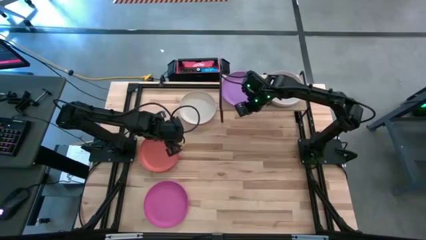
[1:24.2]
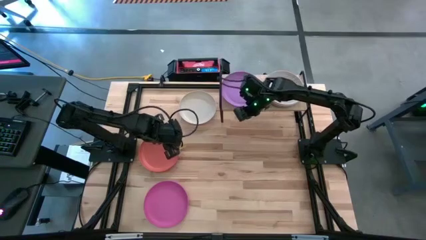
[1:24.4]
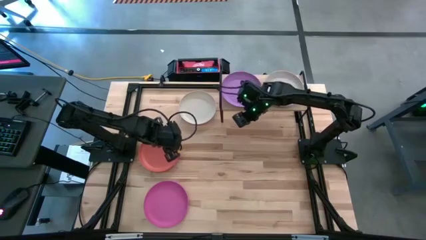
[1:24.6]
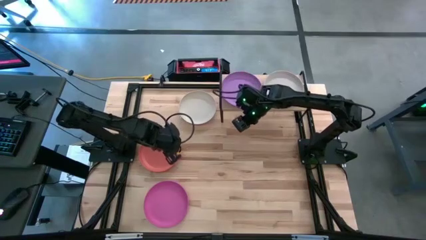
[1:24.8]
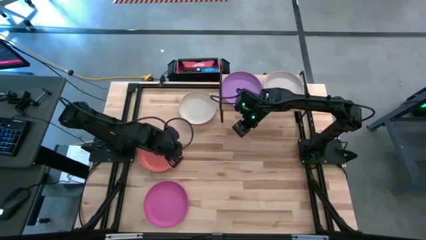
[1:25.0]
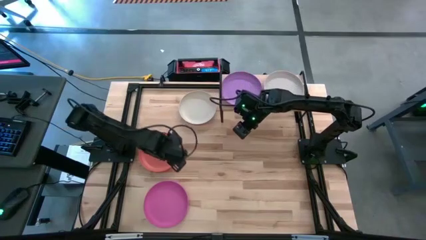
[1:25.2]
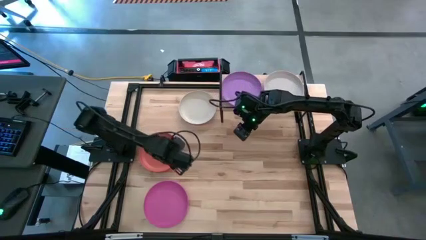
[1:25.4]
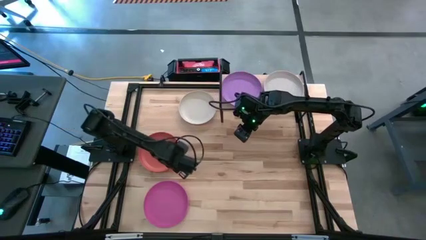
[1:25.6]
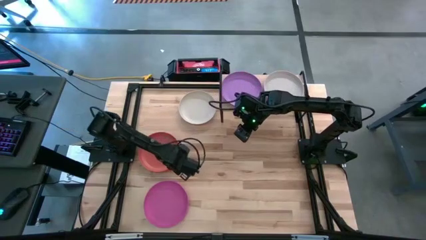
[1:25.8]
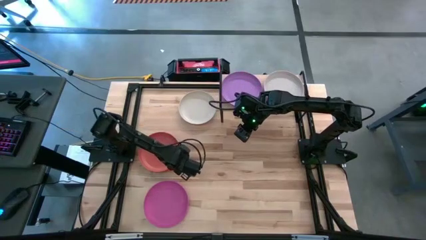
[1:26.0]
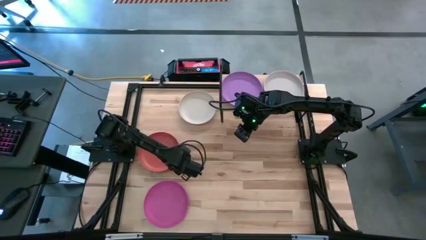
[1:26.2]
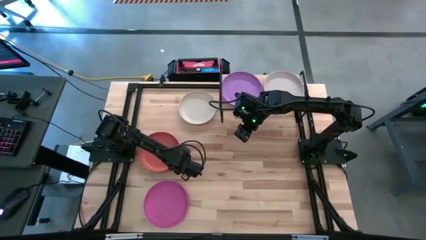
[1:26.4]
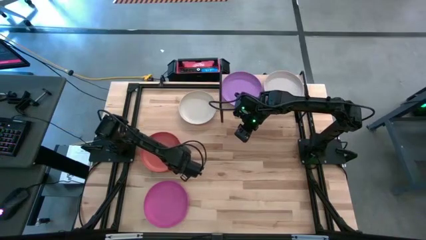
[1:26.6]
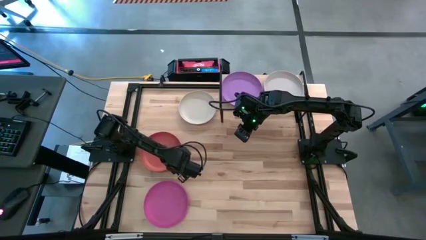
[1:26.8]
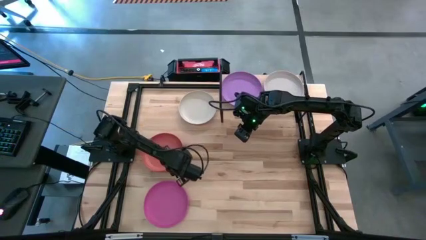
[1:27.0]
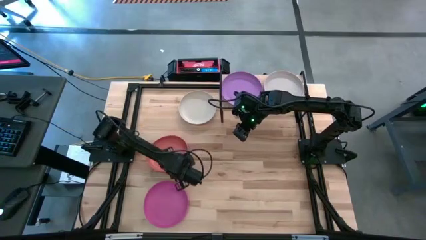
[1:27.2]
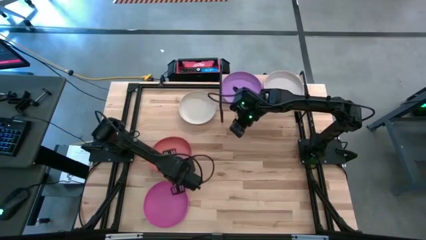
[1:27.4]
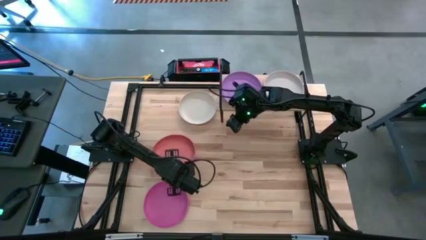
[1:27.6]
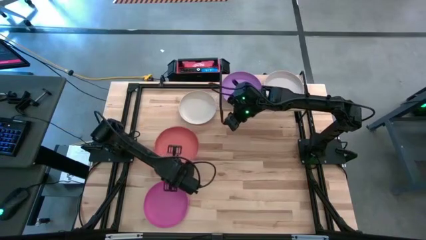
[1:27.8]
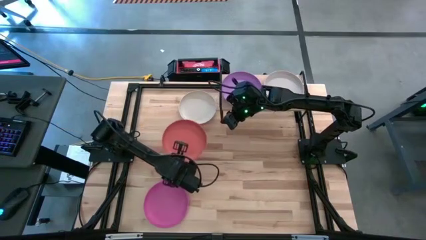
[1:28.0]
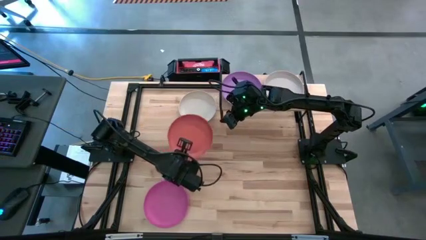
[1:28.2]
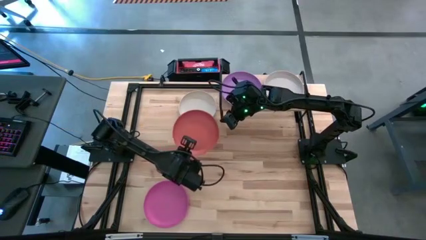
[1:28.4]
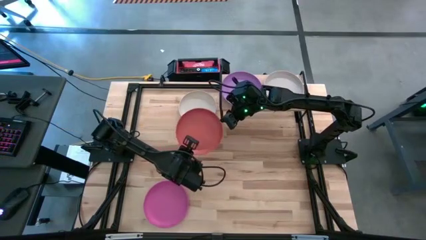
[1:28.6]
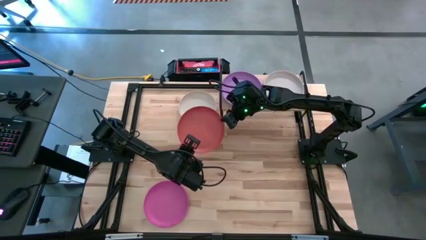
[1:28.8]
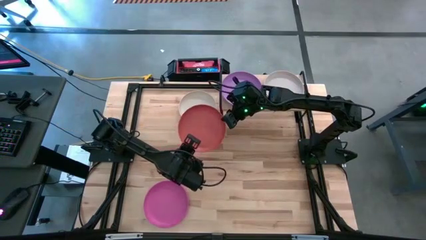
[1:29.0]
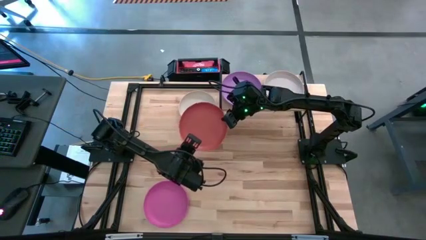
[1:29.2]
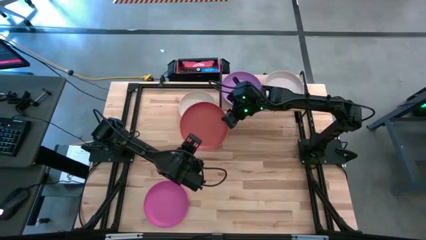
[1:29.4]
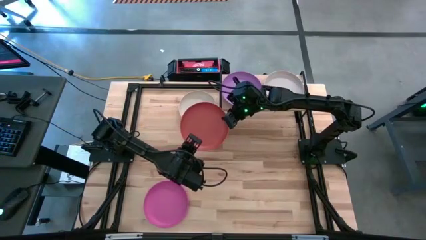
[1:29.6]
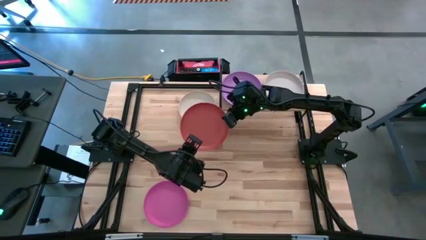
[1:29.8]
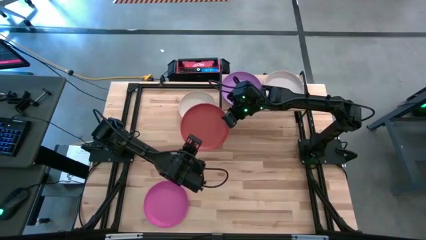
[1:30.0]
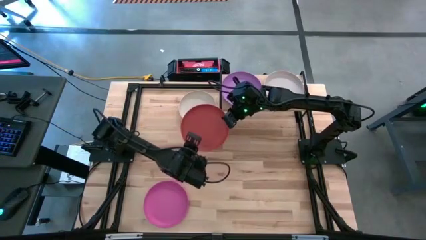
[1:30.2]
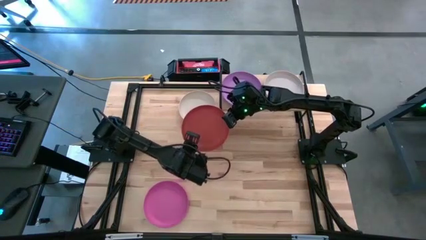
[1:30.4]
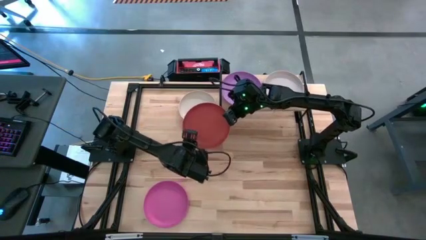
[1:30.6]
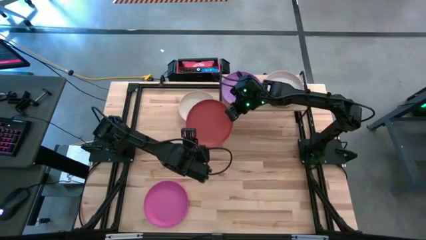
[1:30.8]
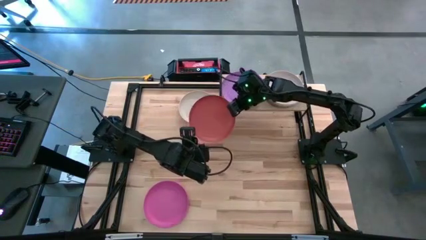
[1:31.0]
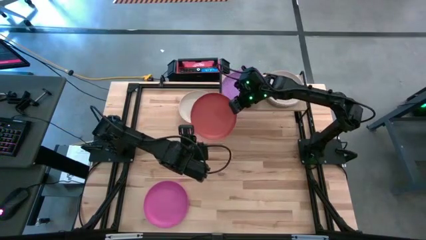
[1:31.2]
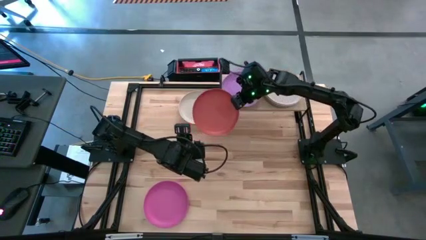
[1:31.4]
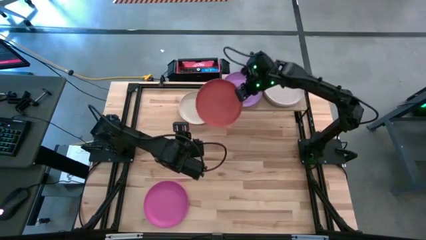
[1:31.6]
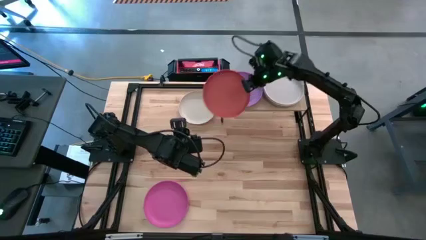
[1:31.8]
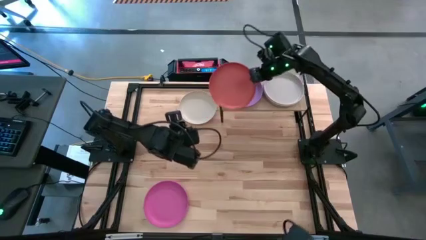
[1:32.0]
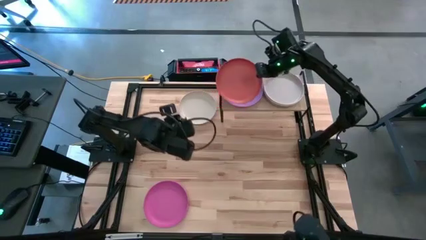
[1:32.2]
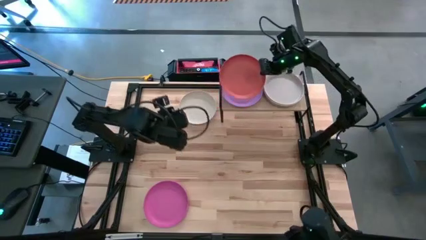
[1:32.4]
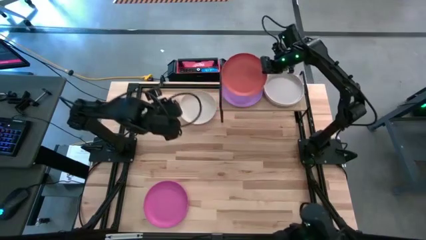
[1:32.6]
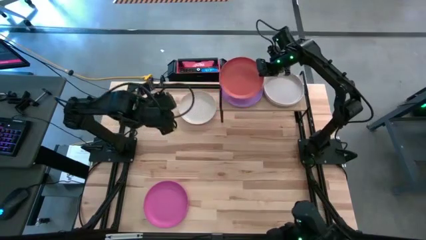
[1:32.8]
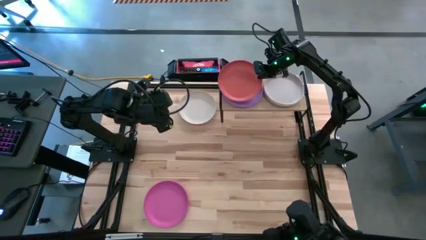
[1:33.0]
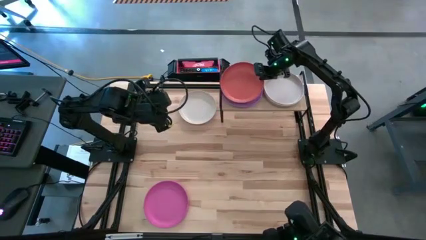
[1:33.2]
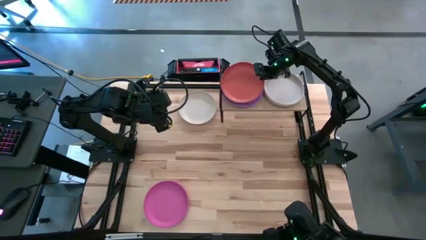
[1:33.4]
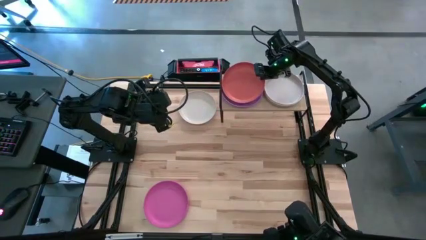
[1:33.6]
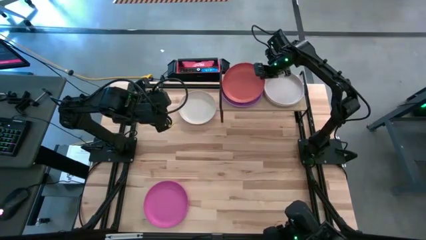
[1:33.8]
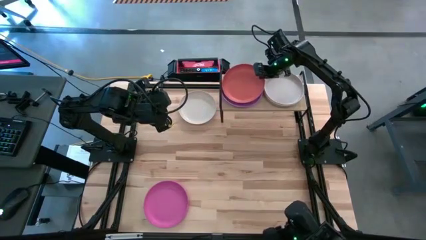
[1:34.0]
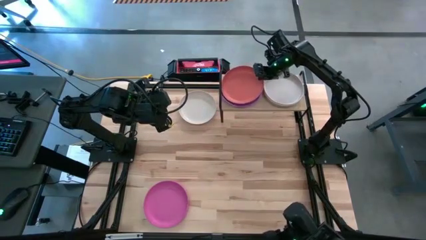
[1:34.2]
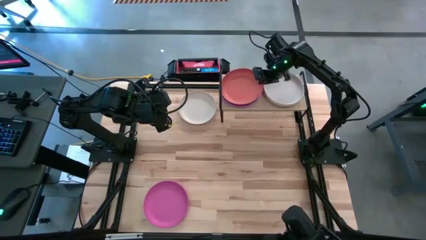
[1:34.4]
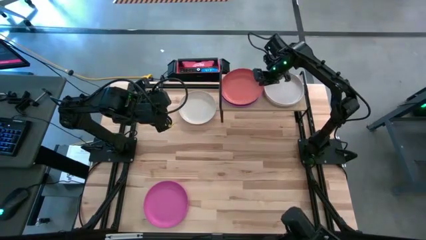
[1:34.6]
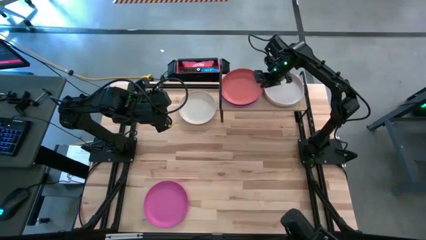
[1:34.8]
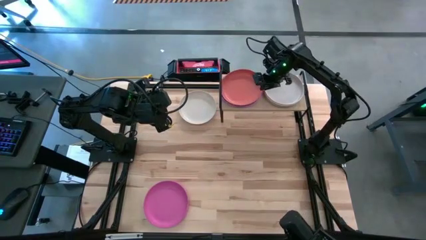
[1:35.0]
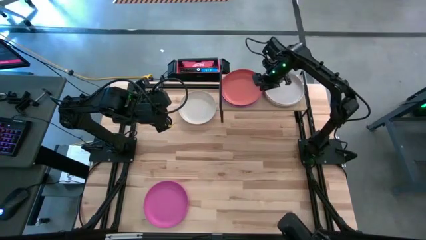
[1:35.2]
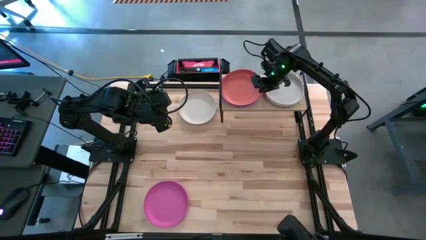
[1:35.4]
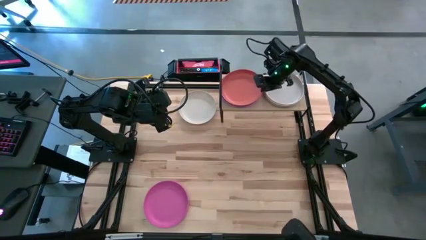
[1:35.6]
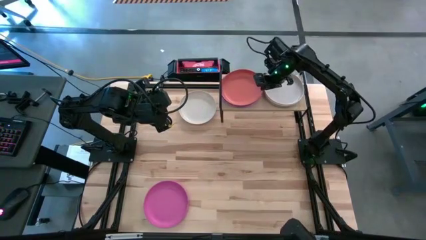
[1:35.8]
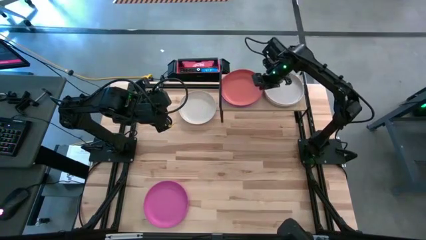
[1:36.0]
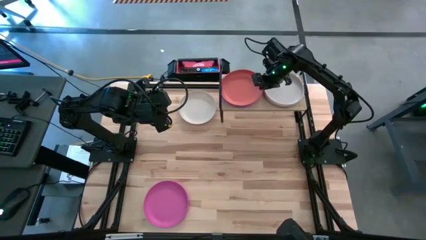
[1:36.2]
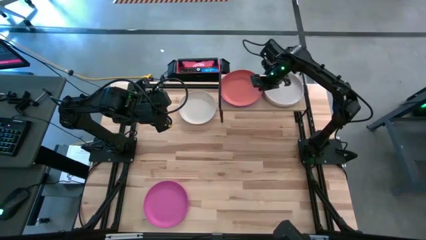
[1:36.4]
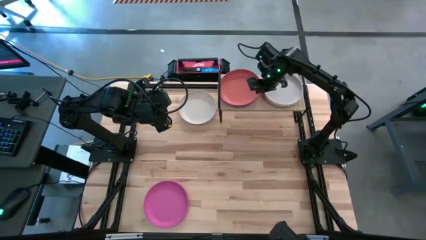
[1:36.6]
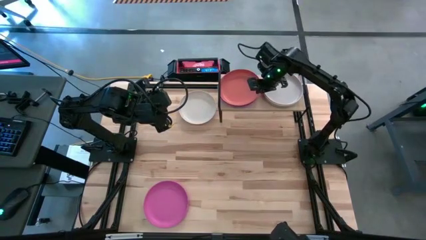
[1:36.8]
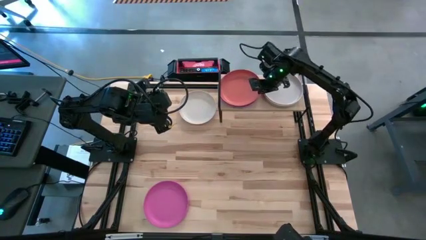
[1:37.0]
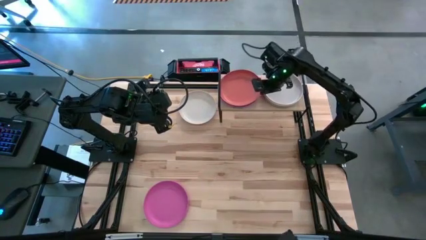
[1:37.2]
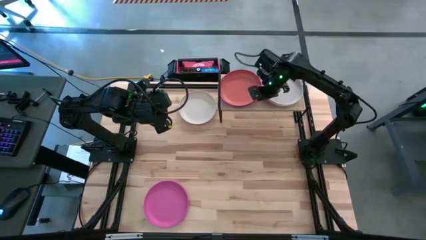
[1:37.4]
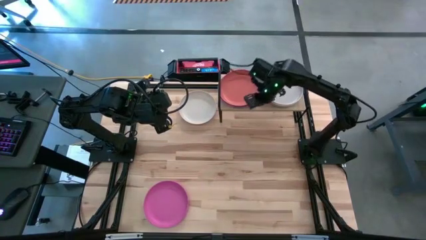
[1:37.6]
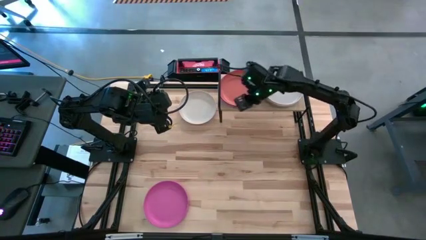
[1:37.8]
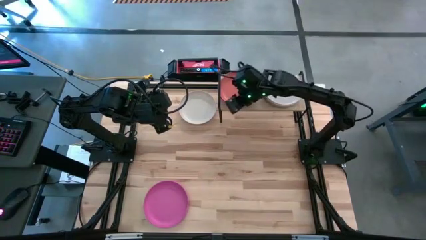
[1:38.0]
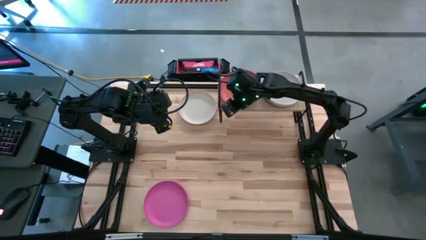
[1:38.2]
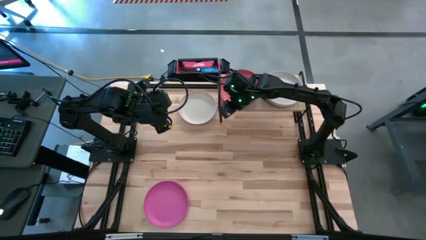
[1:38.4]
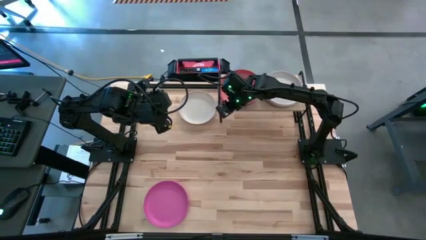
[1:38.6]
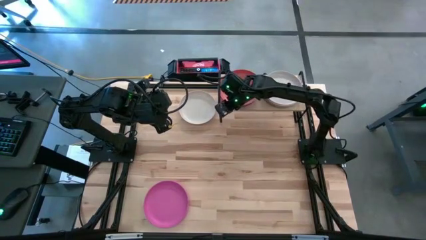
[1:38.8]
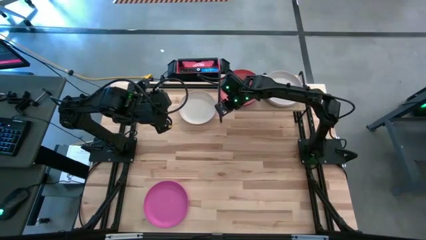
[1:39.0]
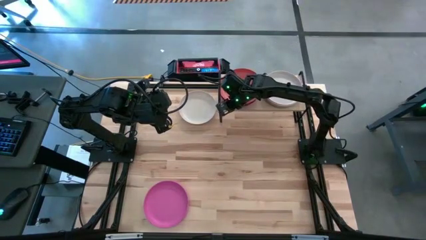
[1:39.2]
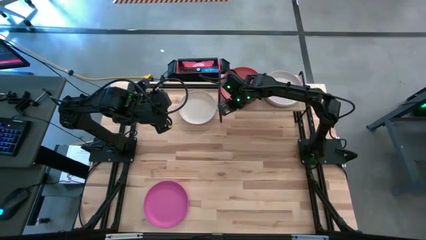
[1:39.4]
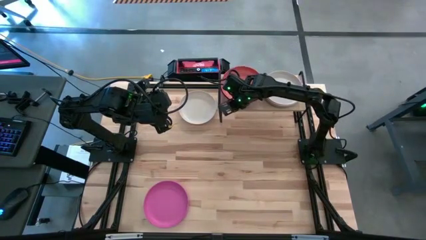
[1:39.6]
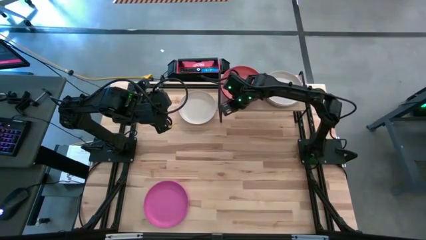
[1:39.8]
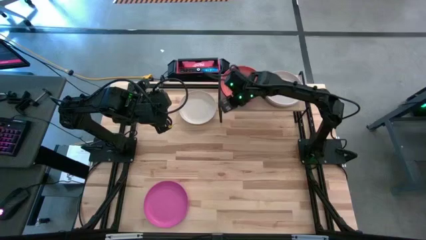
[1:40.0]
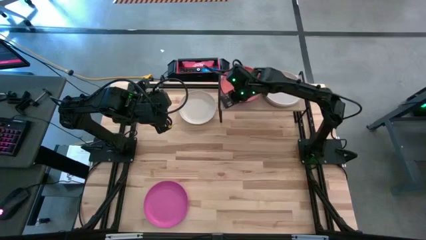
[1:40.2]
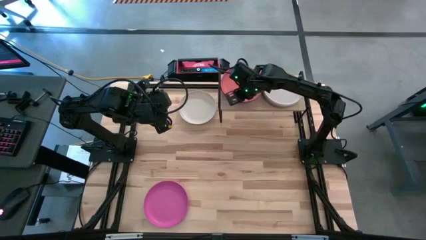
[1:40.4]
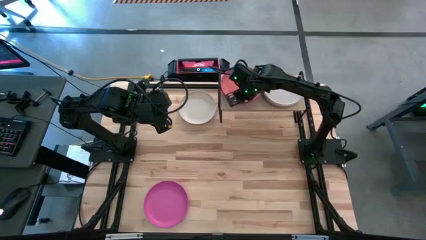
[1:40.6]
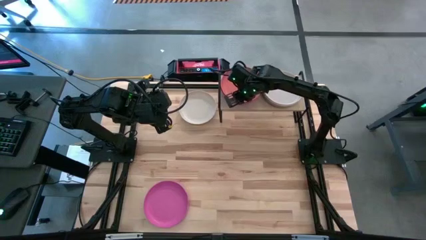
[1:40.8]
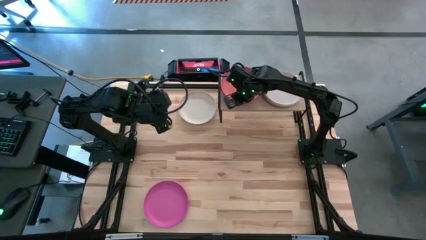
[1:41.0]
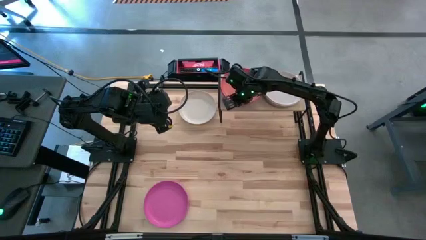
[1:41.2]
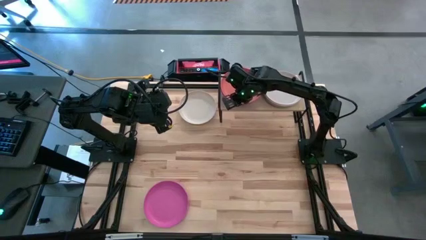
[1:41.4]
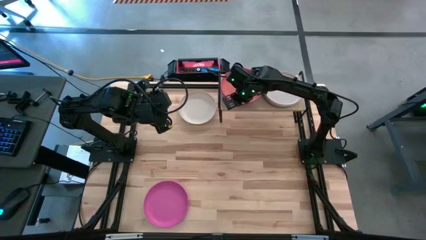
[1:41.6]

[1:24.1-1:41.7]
Task: Place and stack plates onto a shelf
Stack the orange plate on top of the violet plate on the shelf
